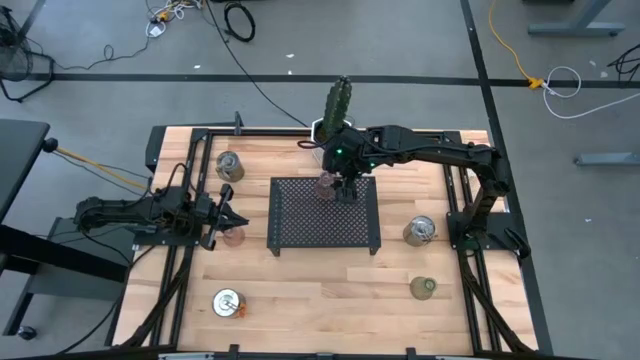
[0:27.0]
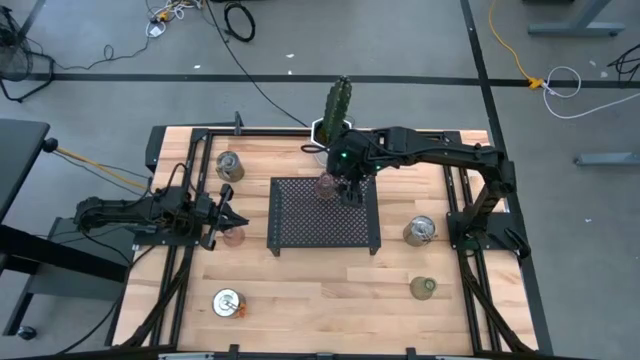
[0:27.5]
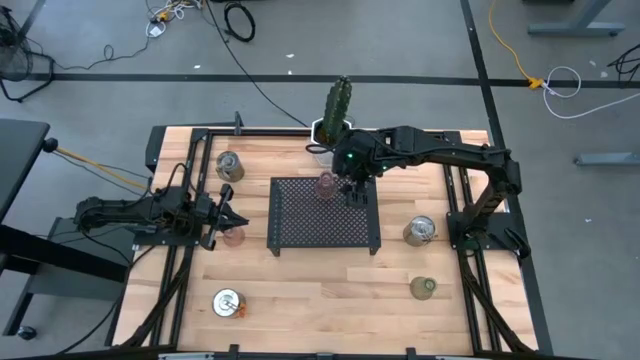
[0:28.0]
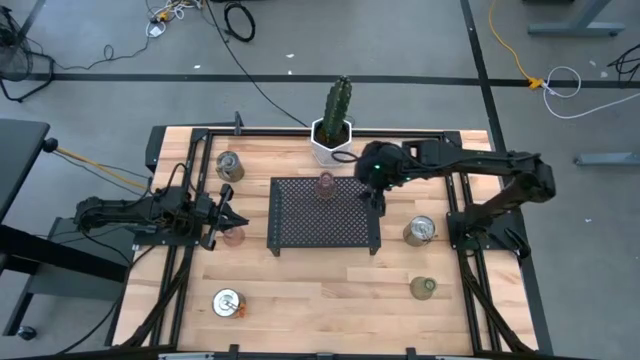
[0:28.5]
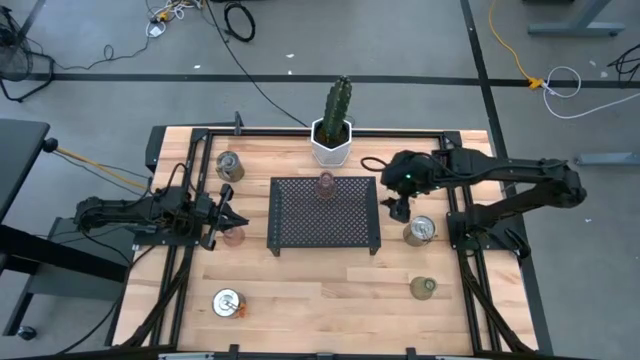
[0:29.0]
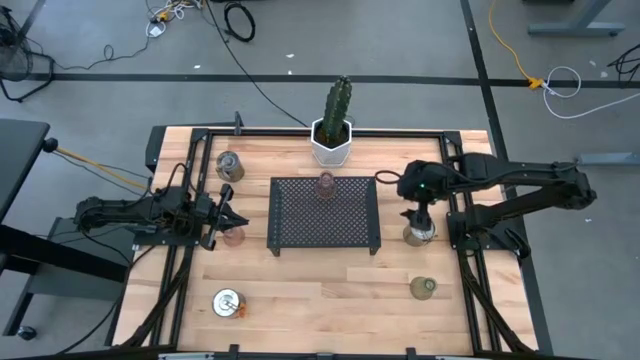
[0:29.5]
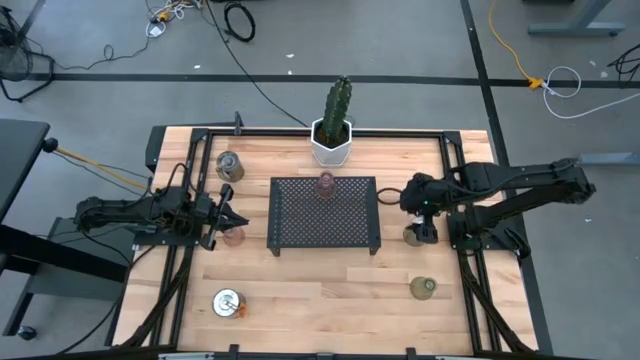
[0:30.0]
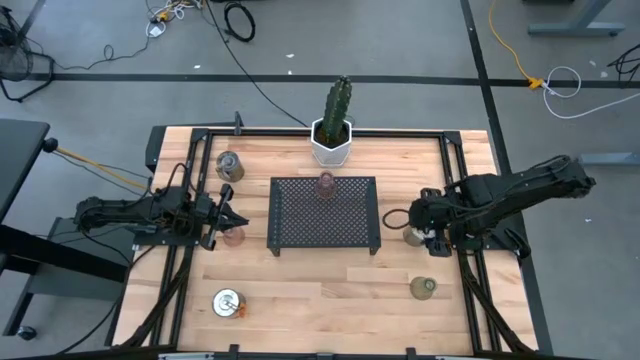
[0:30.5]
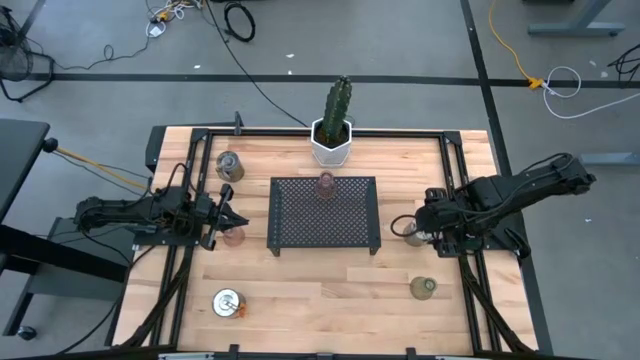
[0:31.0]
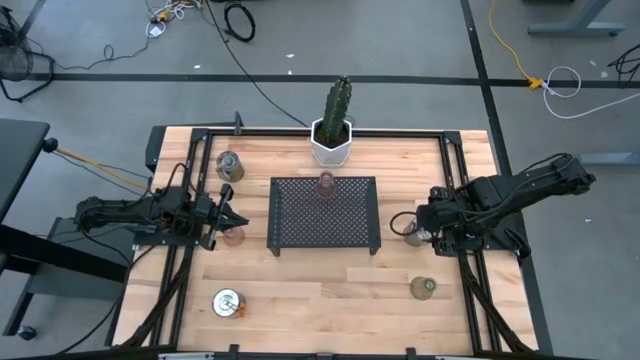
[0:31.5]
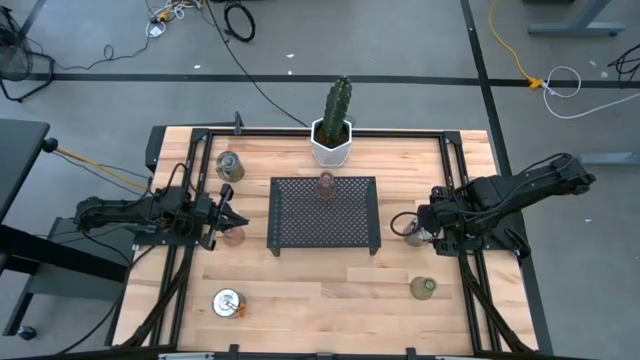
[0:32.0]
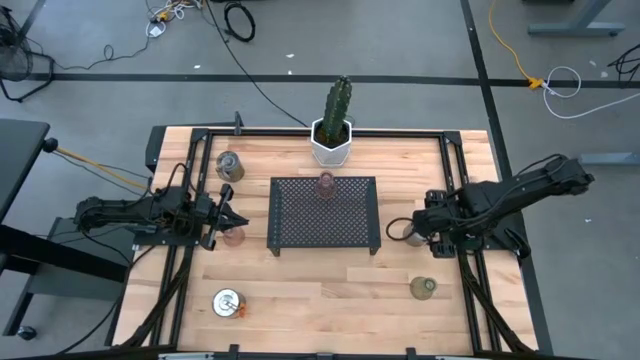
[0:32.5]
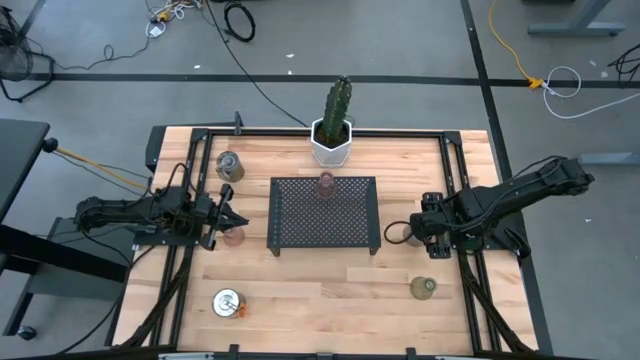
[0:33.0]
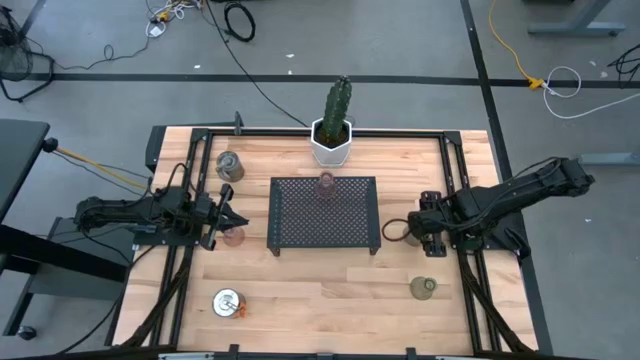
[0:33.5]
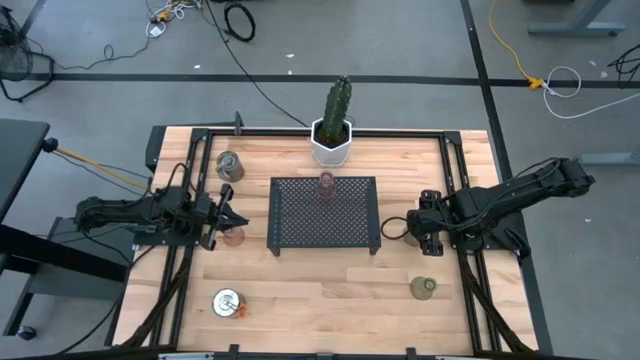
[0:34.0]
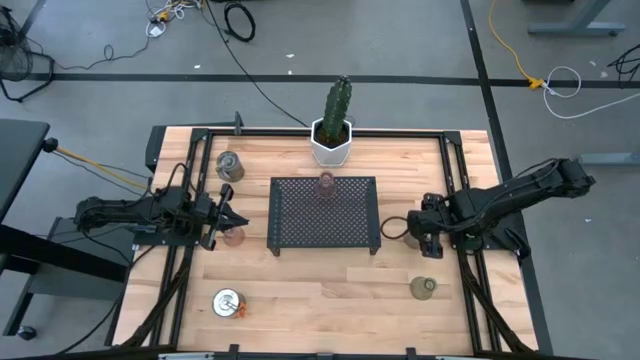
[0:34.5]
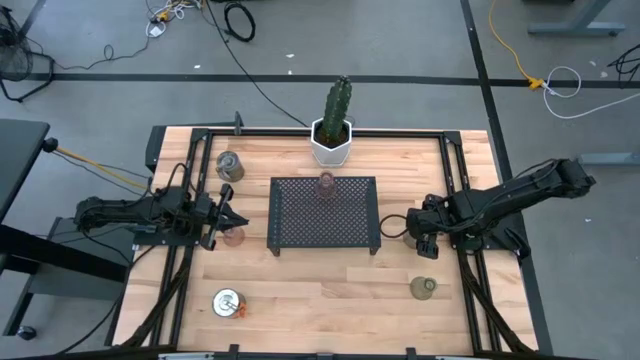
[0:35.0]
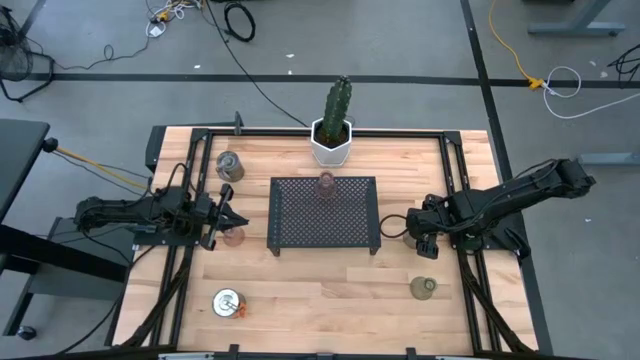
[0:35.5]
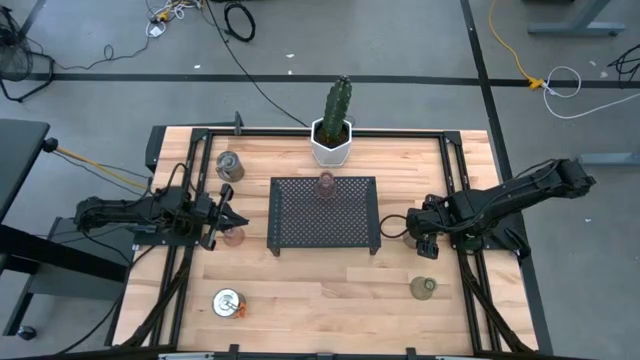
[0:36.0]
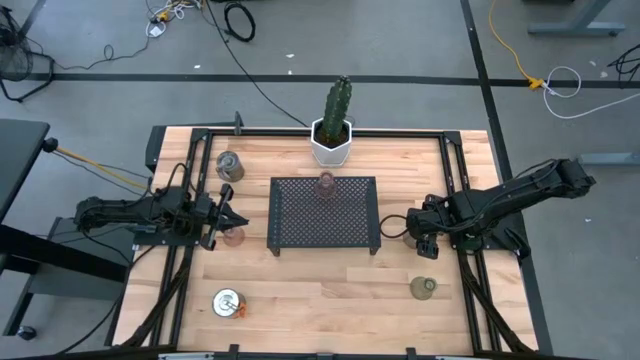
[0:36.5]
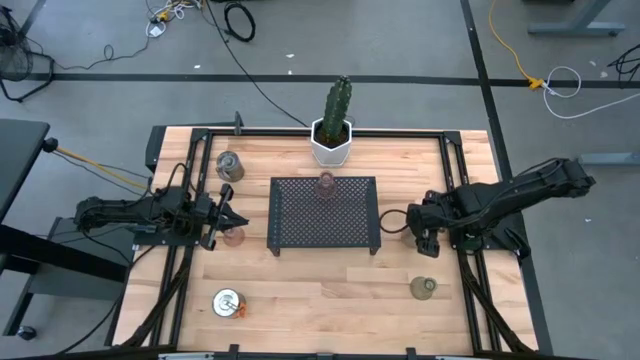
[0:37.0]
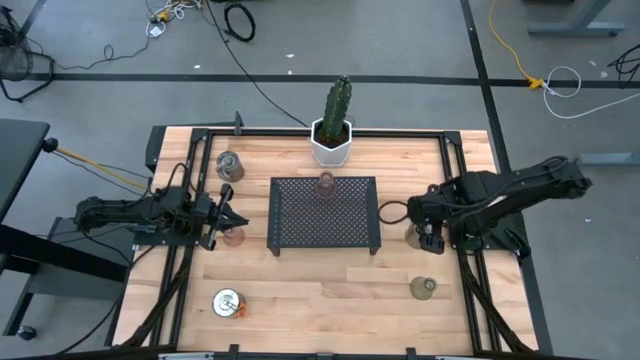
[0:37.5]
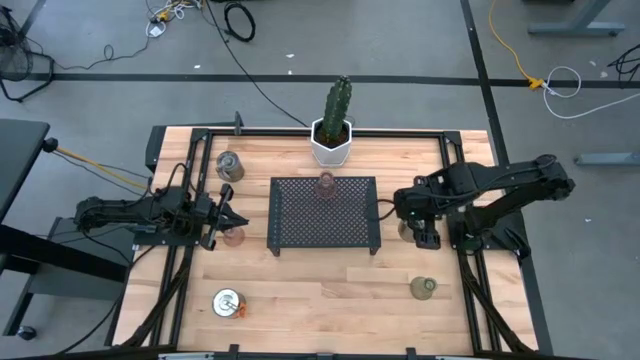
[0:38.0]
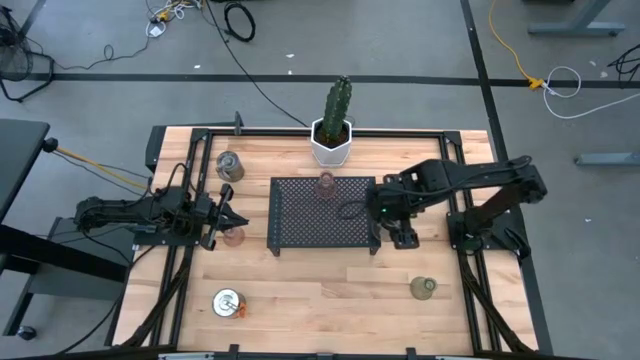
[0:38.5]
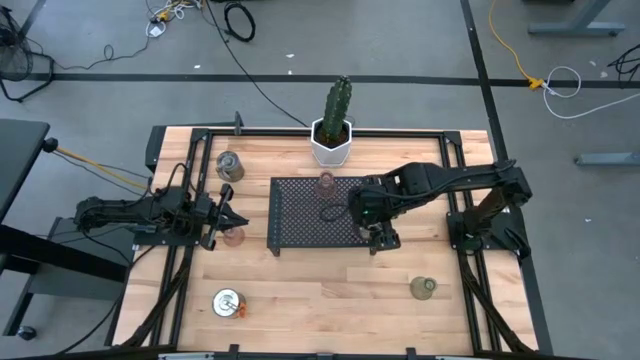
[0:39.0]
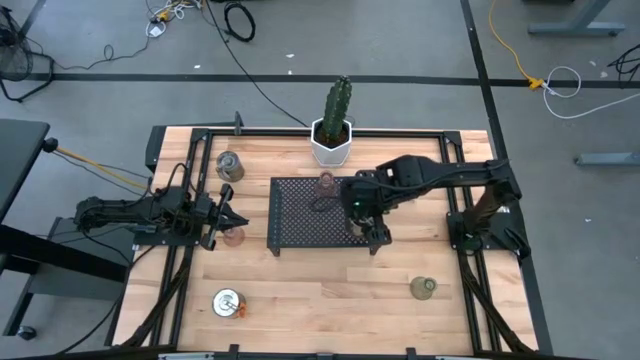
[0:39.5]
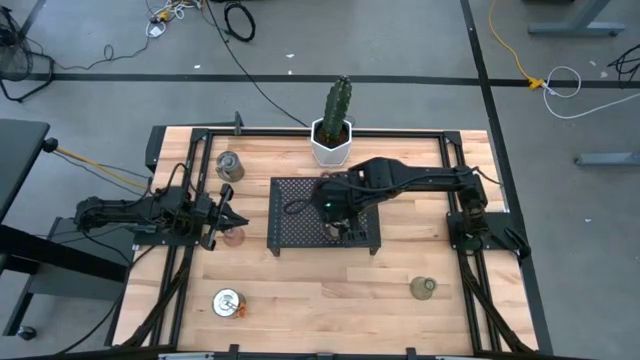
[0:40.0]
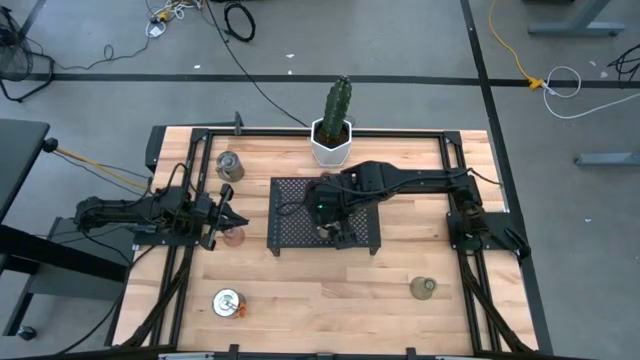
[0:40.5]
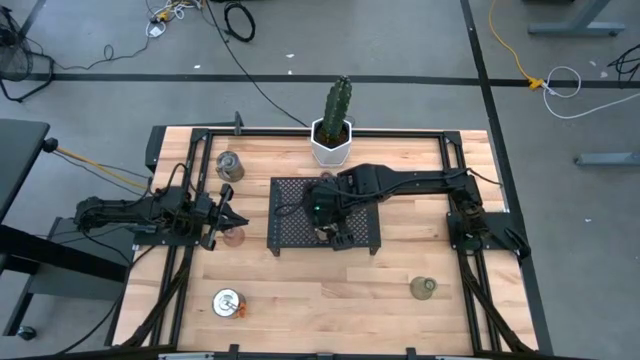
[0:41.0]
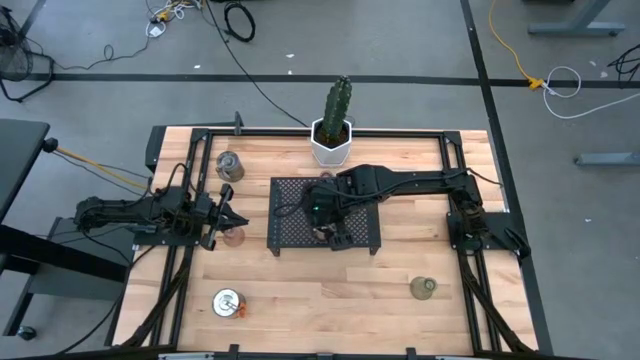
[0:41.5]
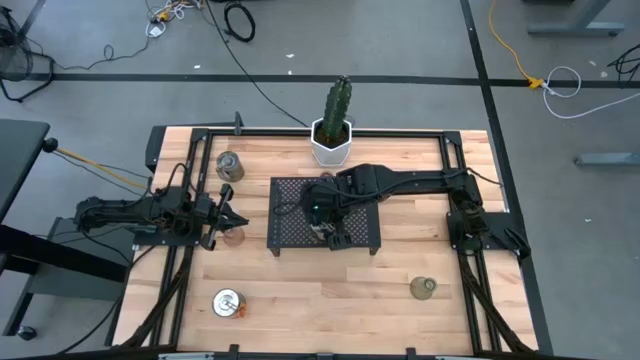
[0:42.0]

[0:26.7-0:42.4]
Task: Pick & Place candle stick holders
Put the middle right silver scented candle on the shelf
